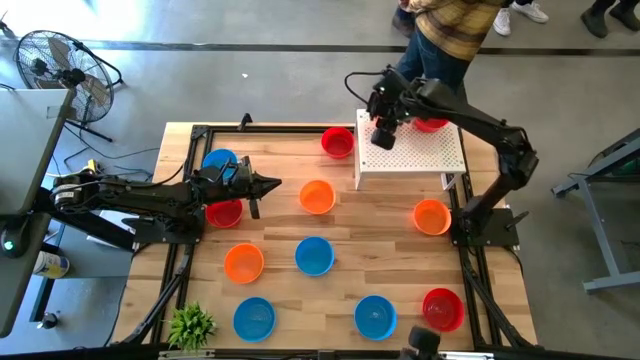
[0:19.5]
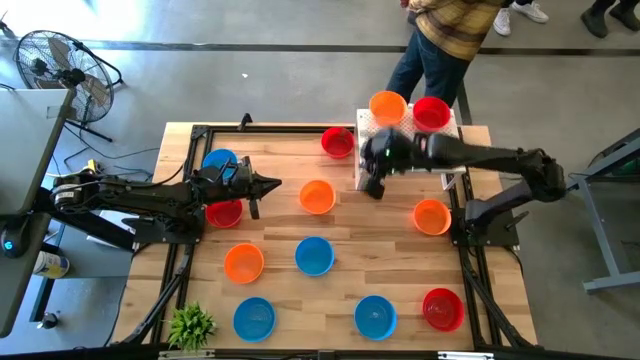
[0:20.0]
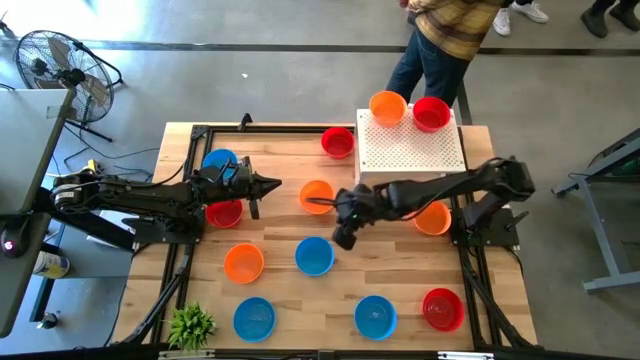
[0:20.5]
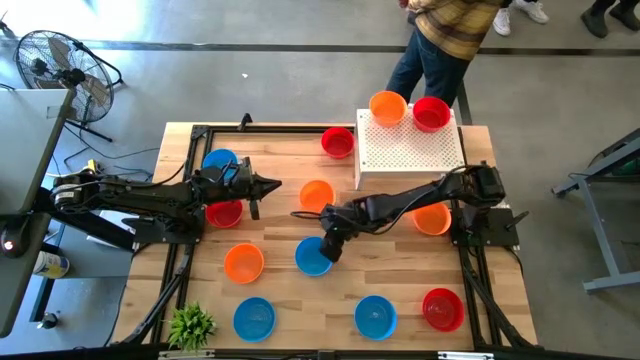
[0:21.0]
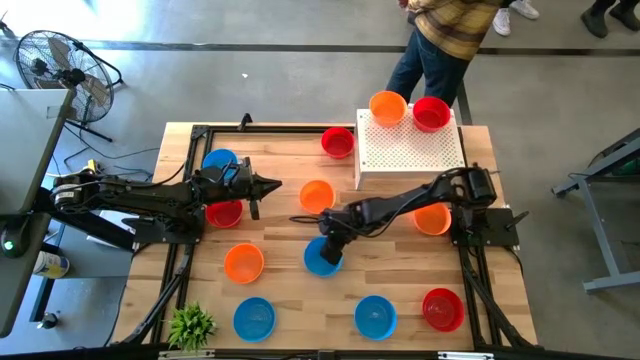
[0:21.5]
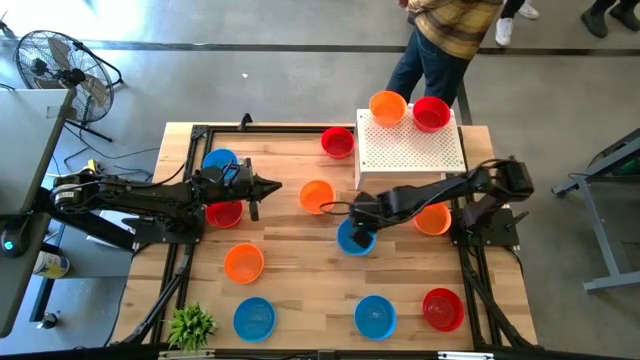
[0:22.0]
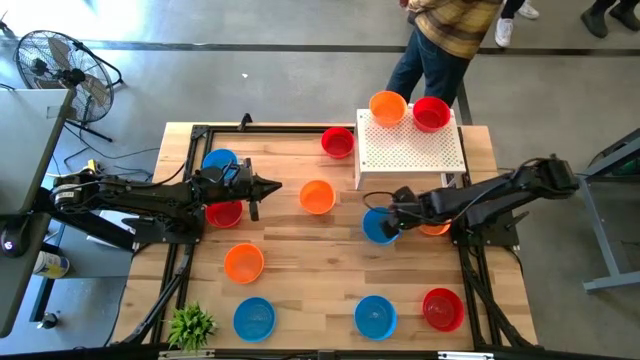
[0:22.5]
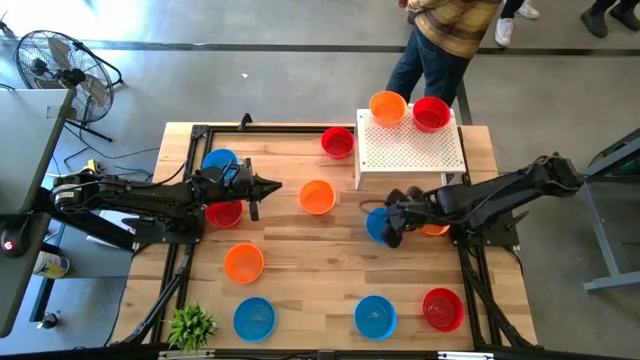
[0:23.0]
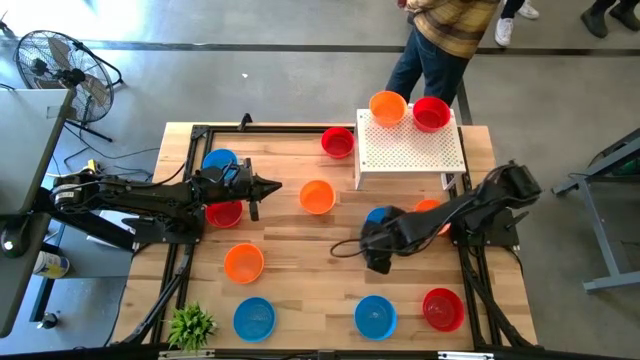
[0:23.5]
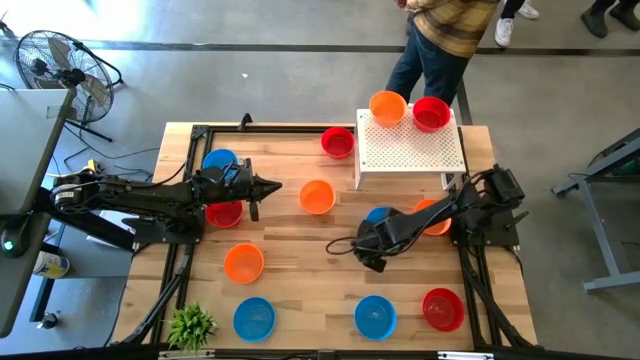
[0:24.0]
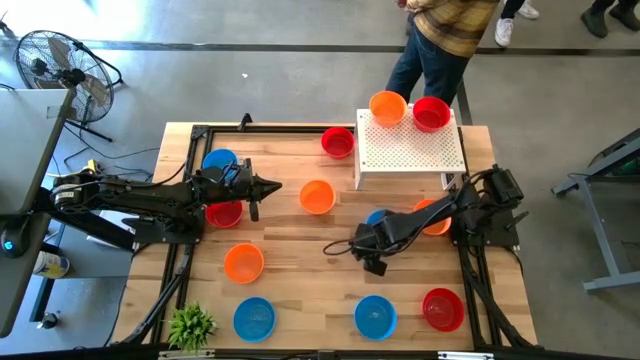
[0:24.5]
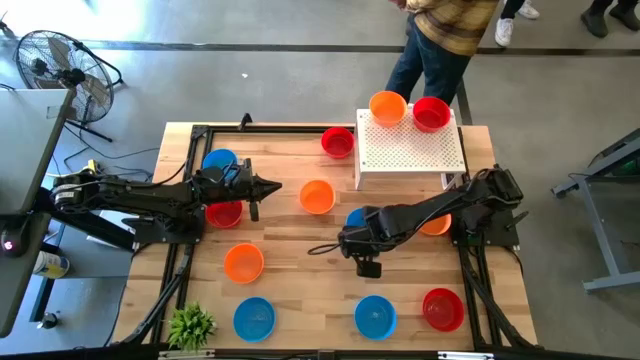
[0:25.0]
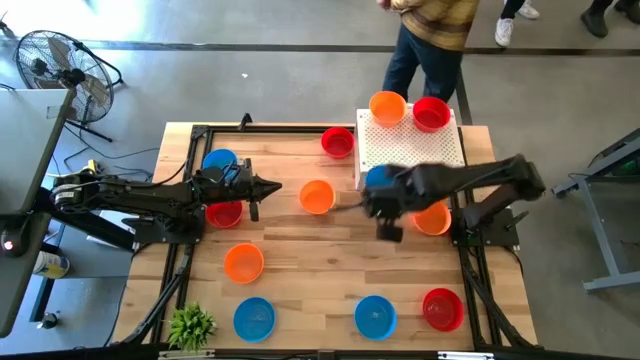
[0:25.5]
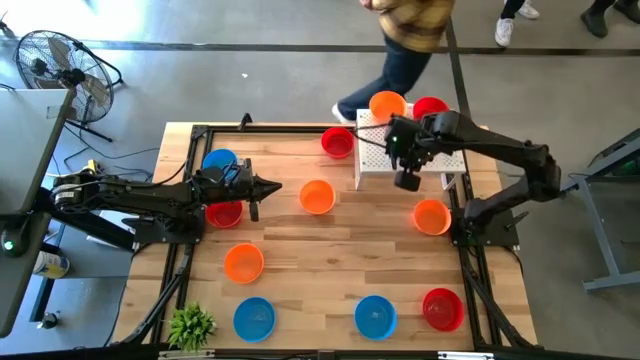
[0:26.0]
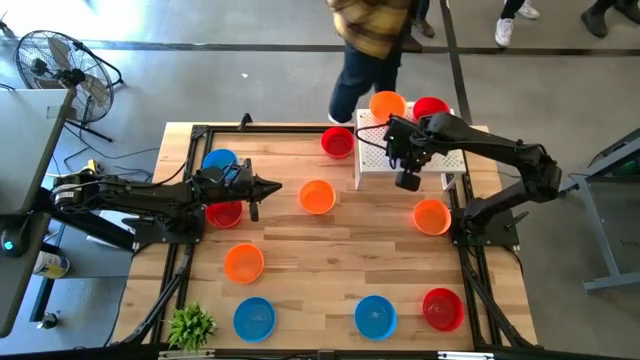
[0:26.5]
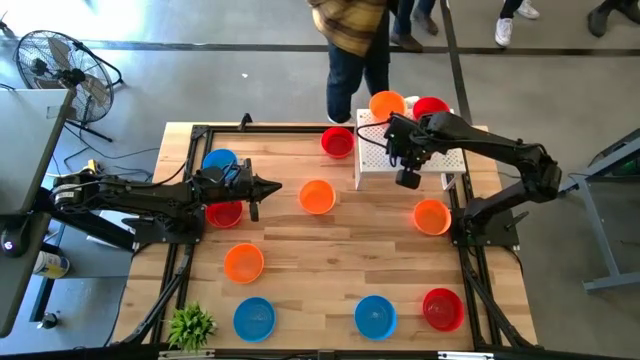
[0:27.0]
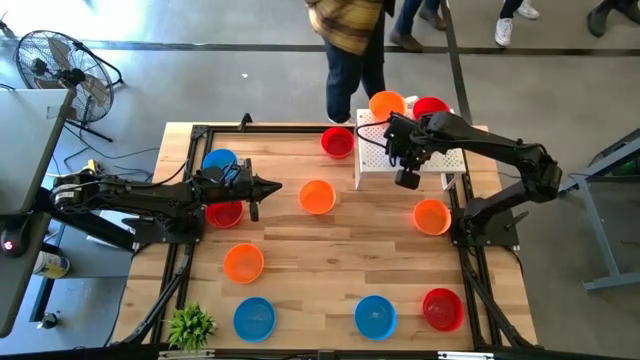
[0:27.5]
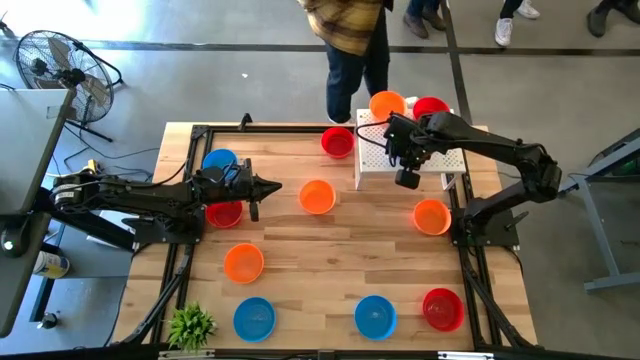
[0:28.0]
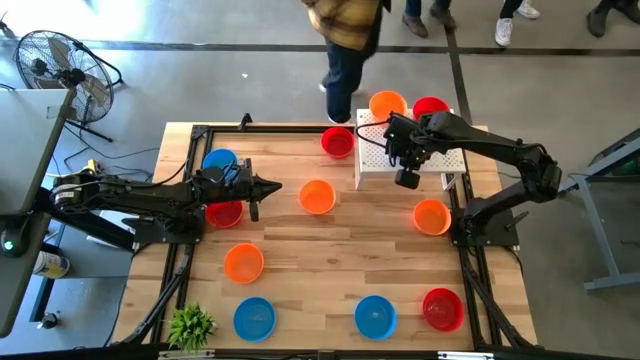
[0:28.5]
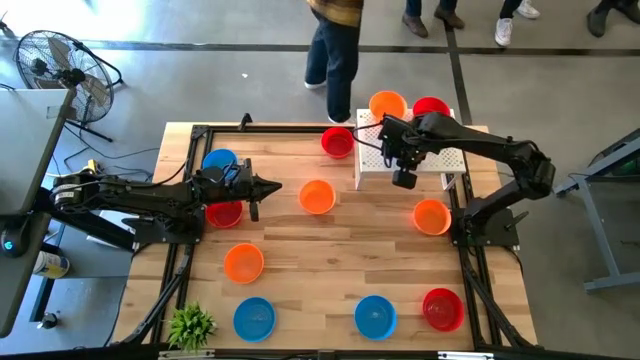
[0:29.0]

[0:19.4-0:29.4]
Task: Pick & Place Mini bowls
Put the blue bowl on the shelf

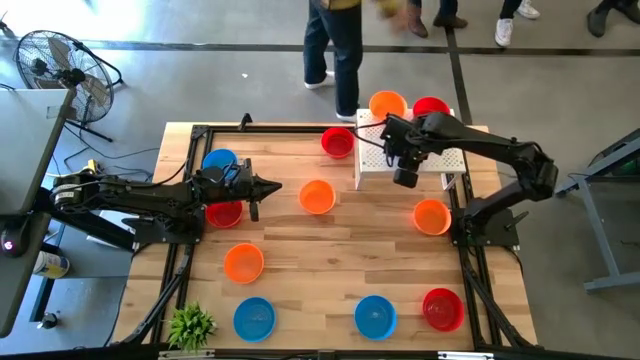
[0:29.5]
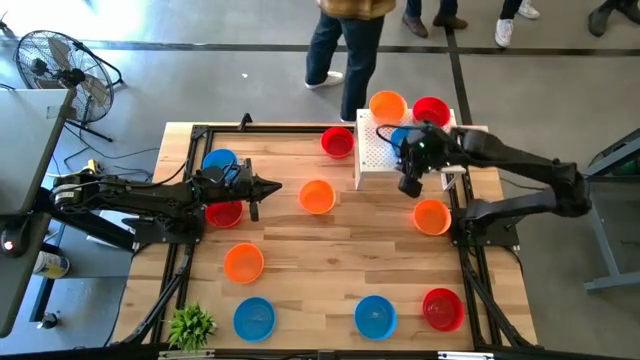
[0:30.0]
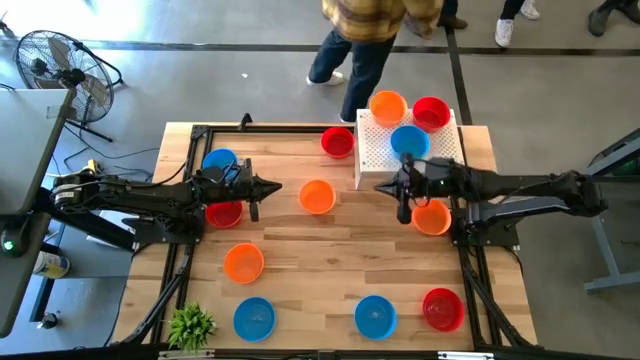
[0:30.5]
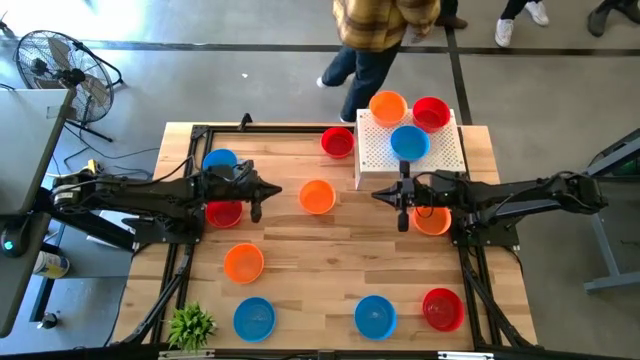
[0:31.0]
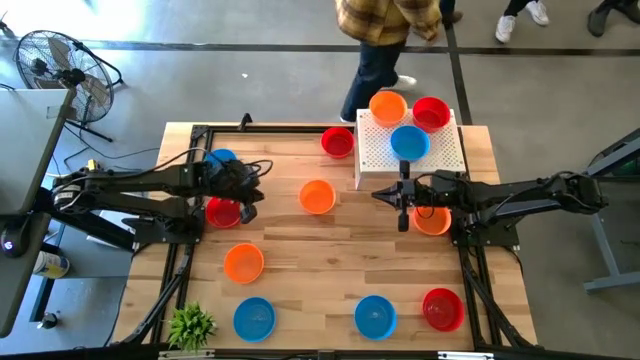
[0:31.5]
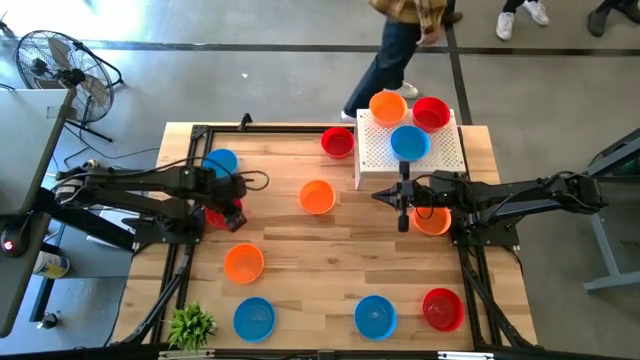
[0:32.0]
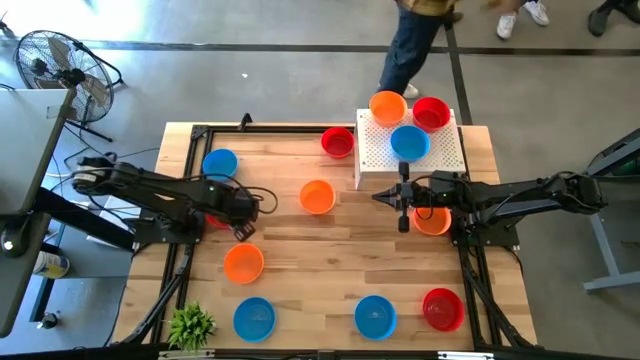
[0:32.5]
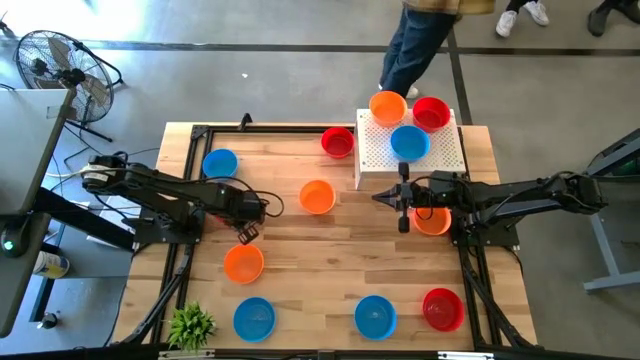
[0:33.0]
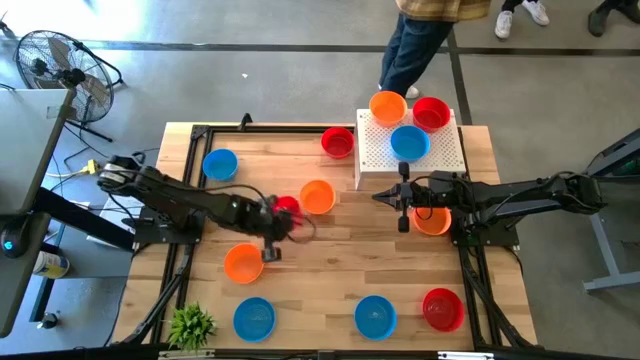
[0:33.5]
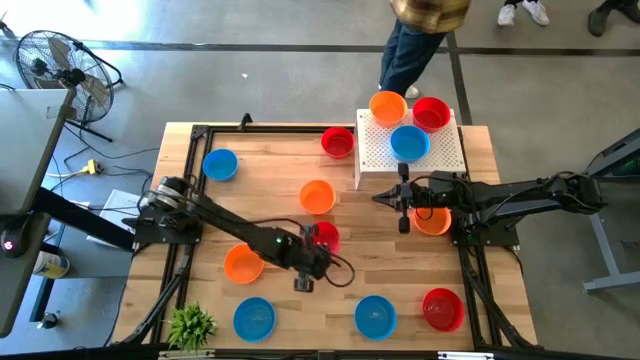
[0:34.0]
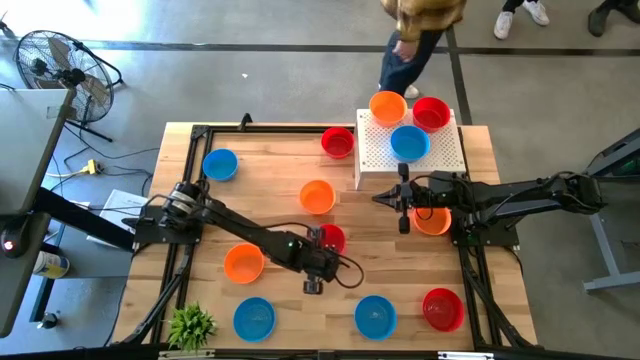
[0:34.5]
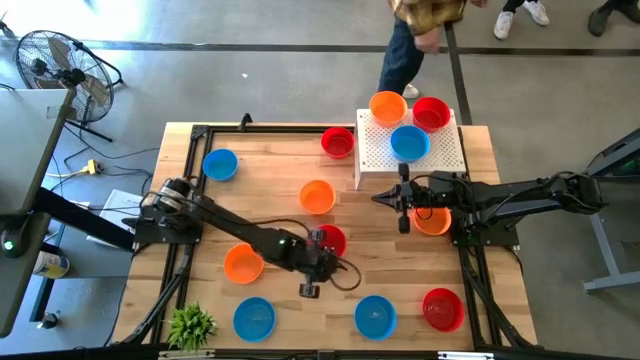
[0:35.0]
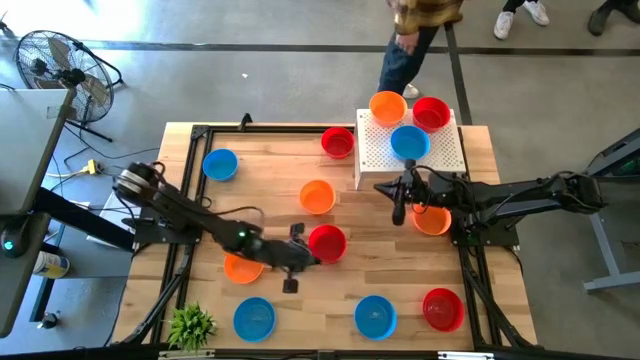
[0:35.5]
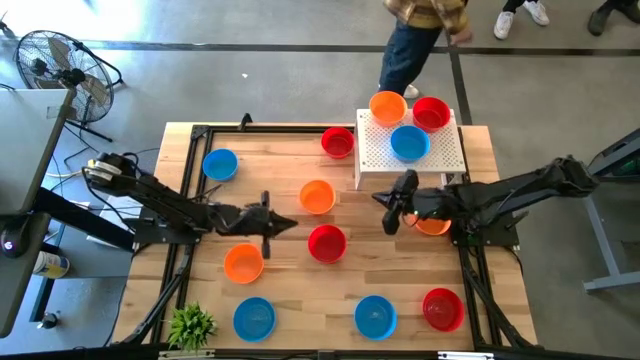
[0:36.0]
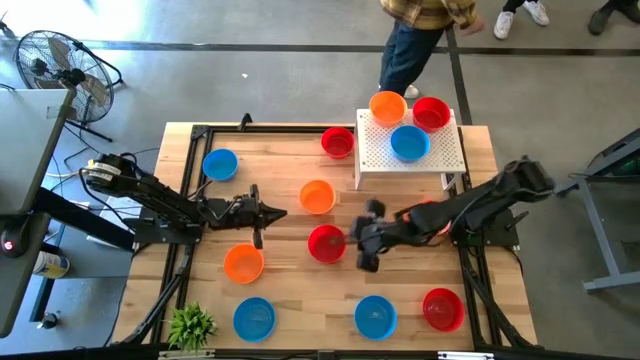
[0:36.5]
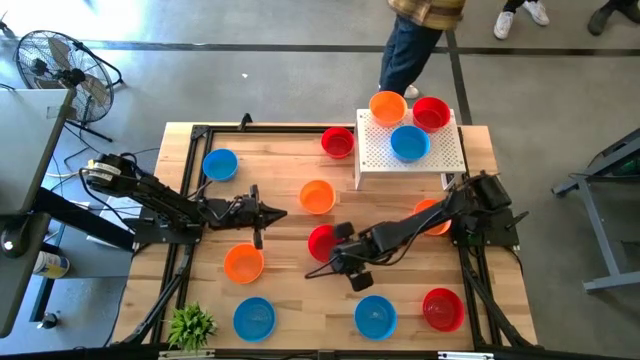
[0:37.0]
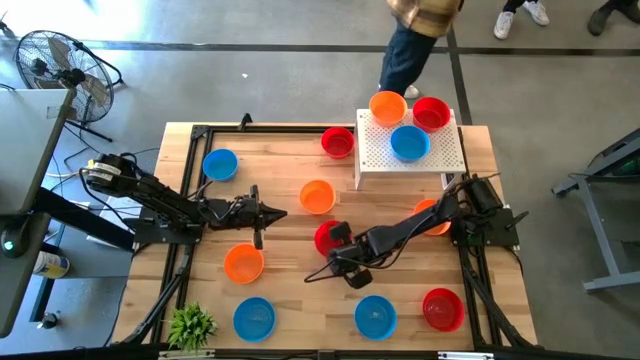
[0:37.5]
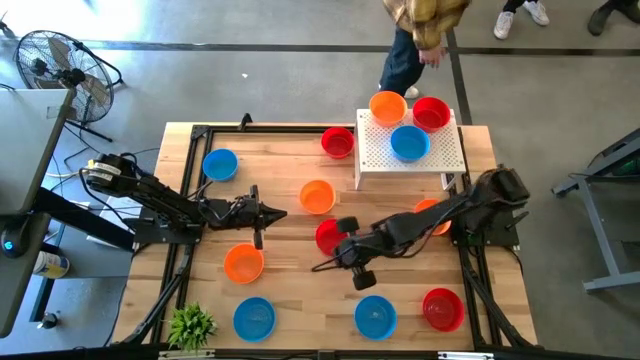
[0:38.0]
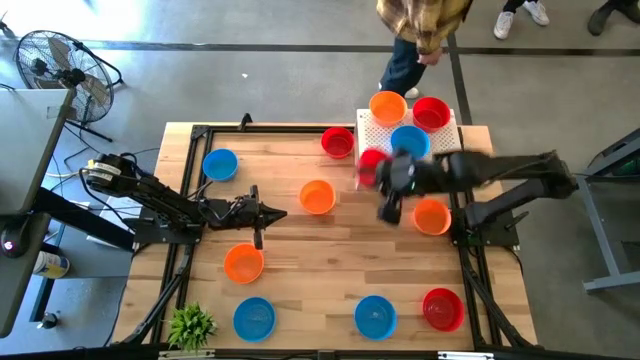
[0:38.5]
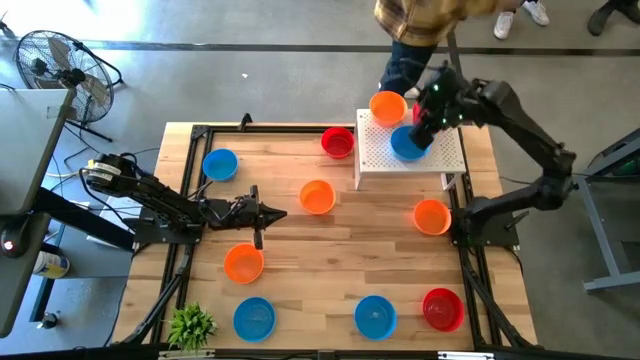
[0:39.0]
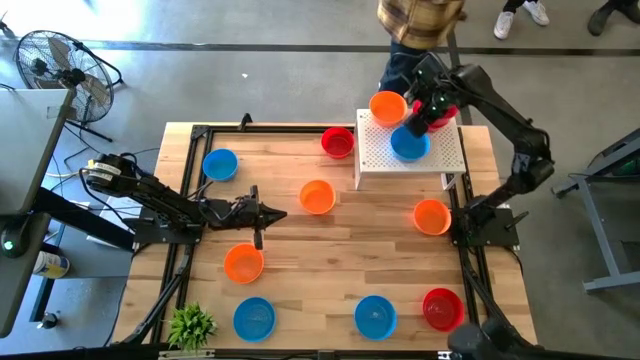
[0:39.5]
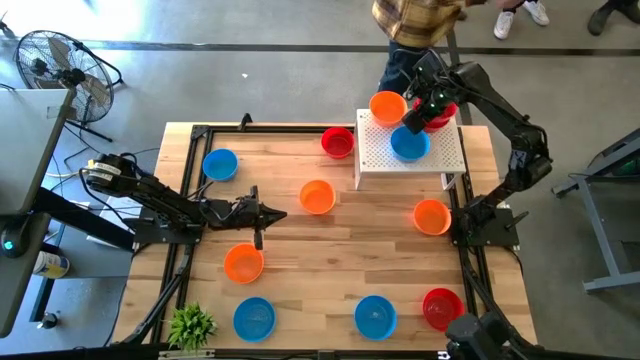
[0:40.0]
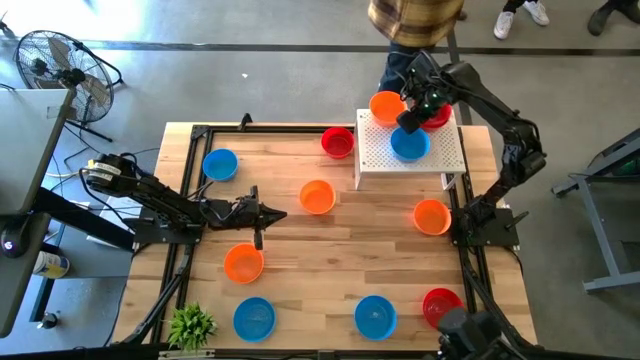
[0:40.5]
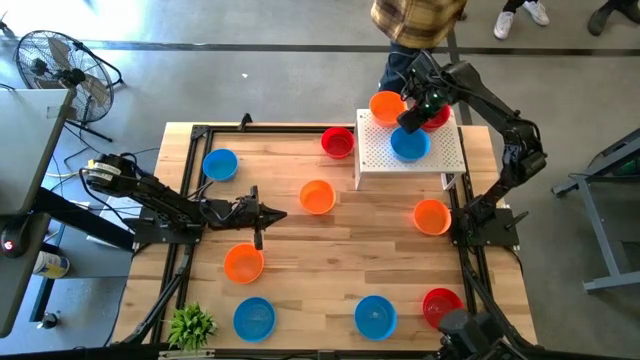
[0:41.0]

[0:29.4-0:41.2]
Stack the red bowl on the red bowl on the shelf
